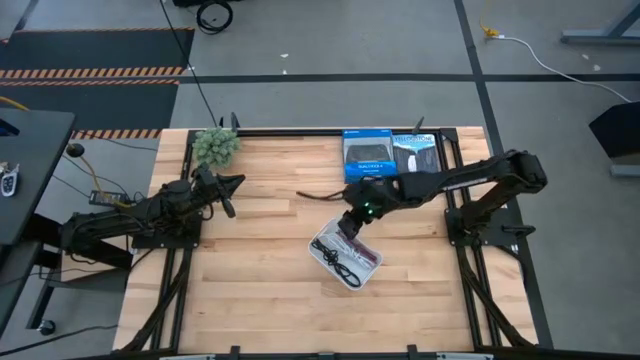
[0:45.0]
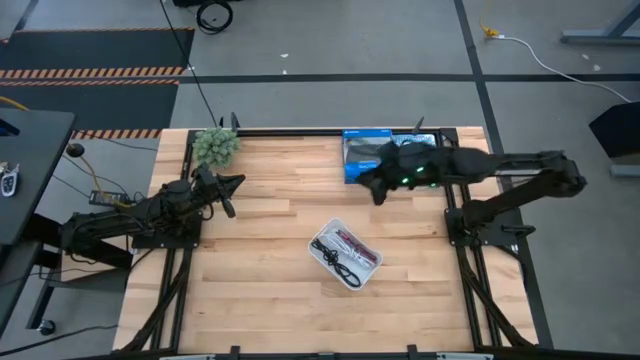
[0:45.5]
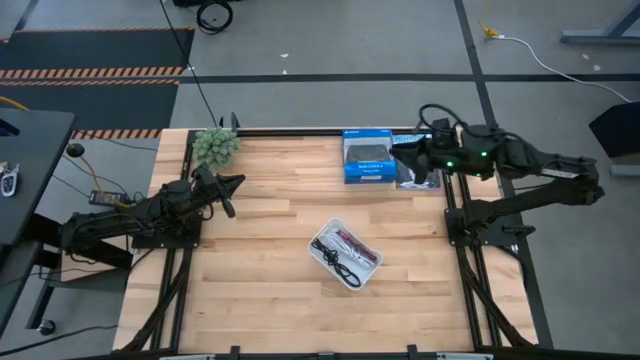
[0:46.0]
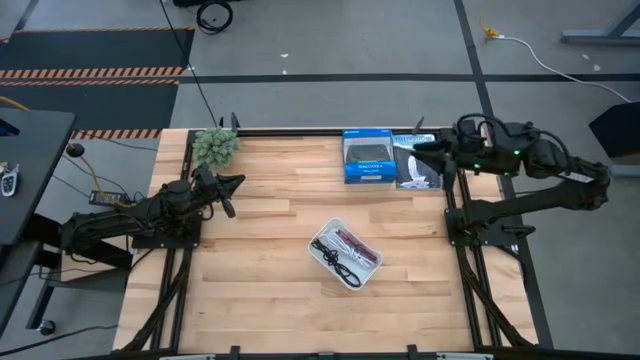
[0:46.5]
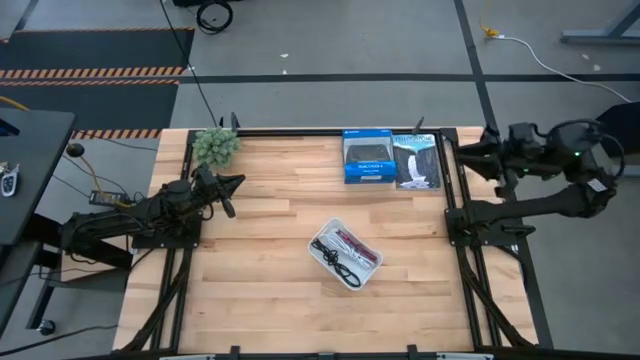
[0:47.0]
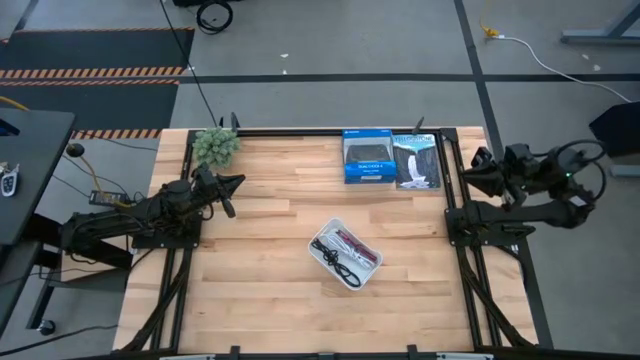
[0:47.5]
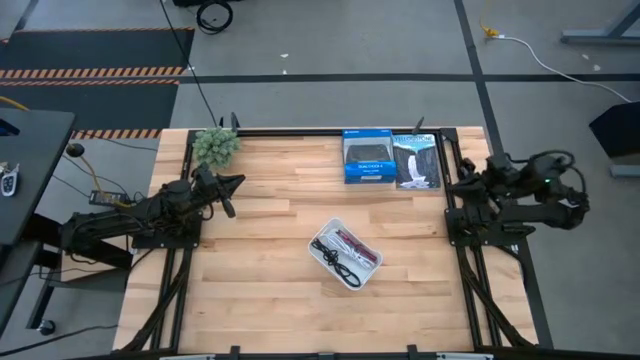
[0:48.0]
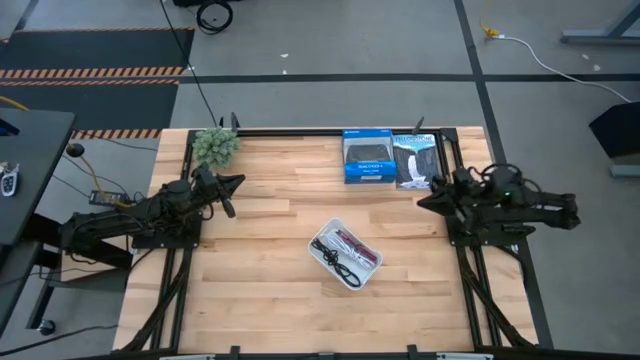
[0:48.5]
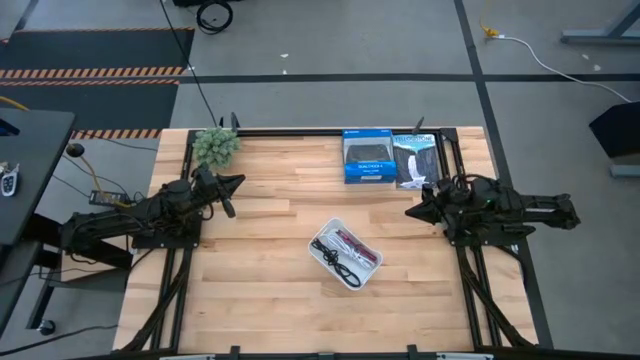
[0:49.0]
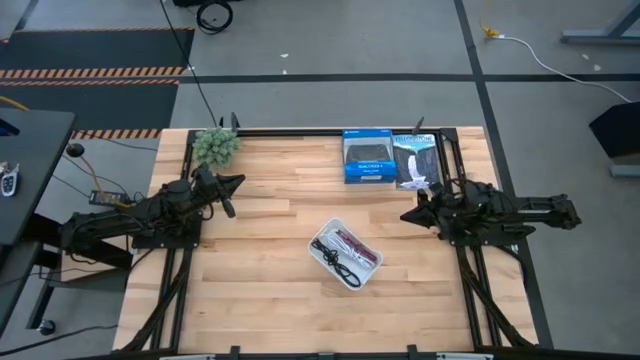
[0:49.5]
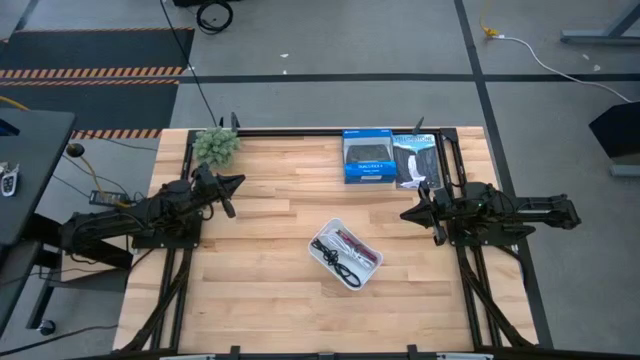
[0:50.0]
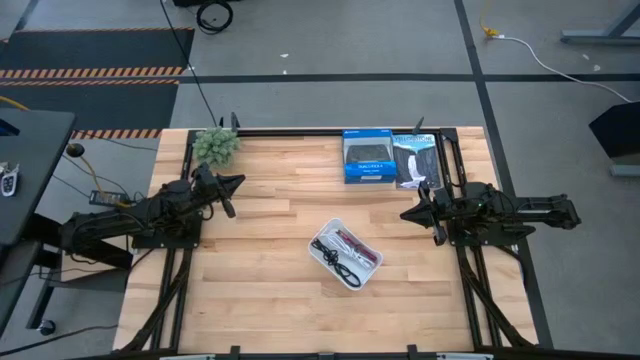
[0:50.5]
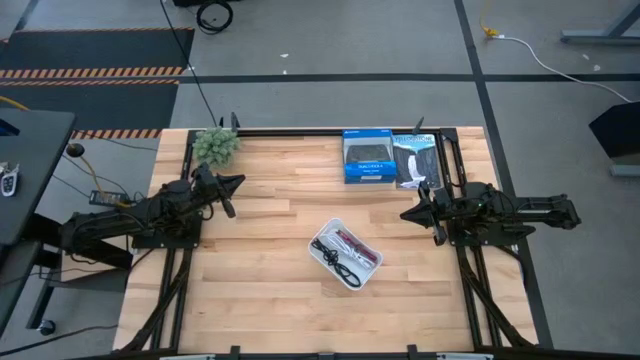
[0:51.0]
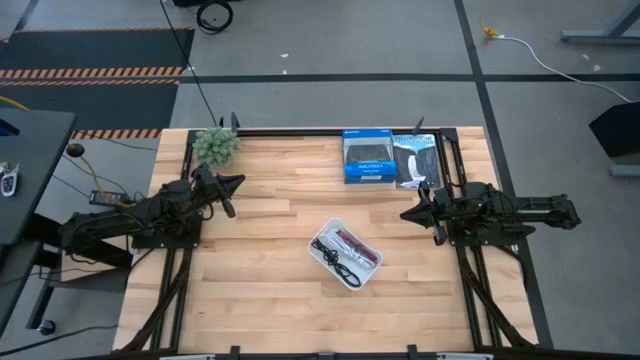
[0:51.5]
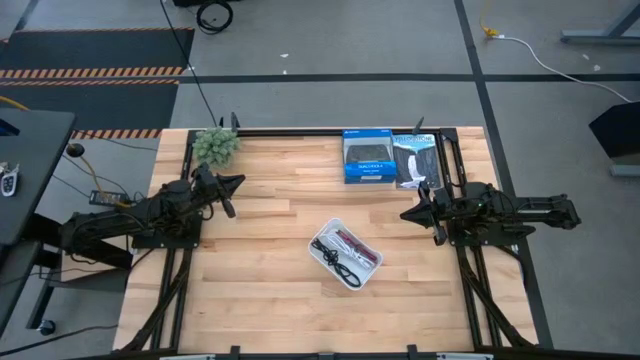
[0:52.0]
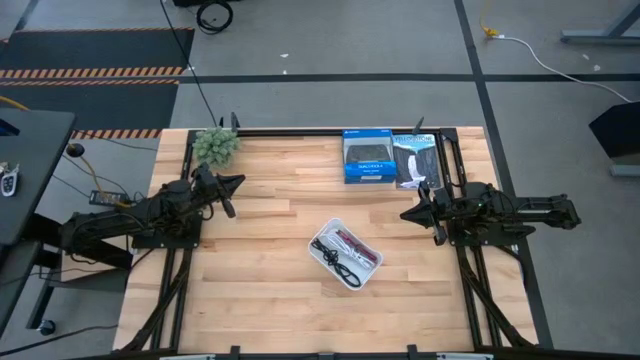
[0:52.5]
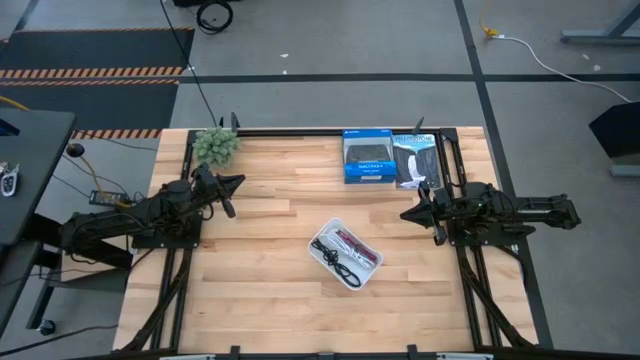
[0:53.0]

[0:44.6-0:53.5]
Task: Pick and place USB-C Cables
Return to Home Position

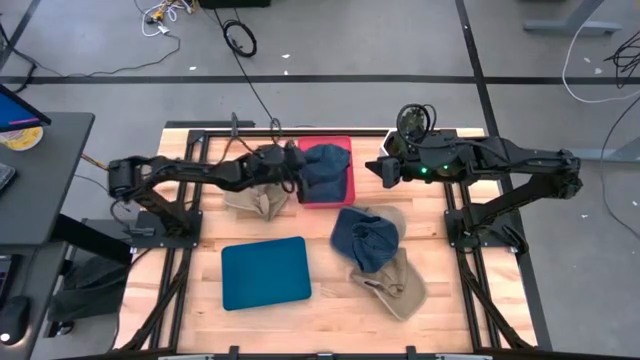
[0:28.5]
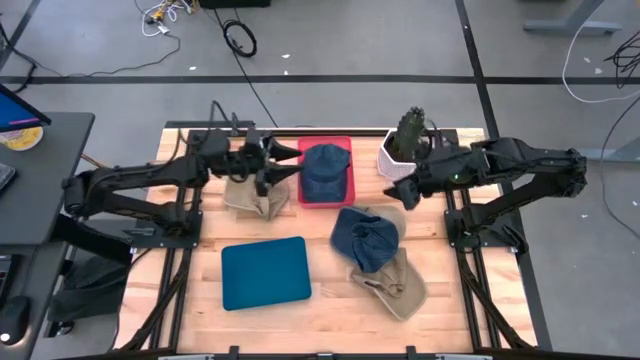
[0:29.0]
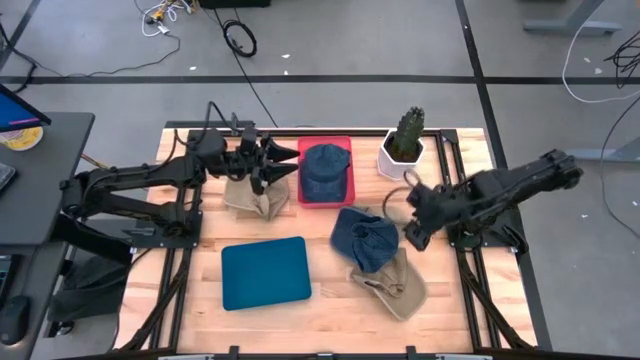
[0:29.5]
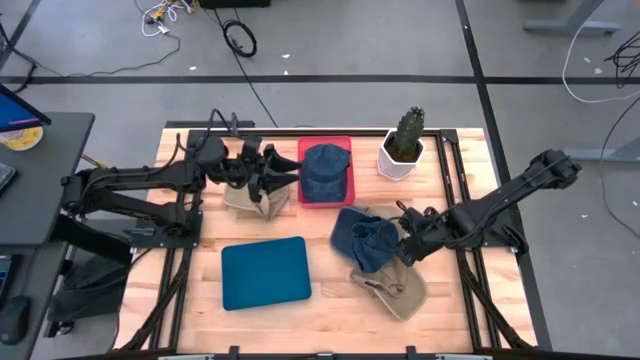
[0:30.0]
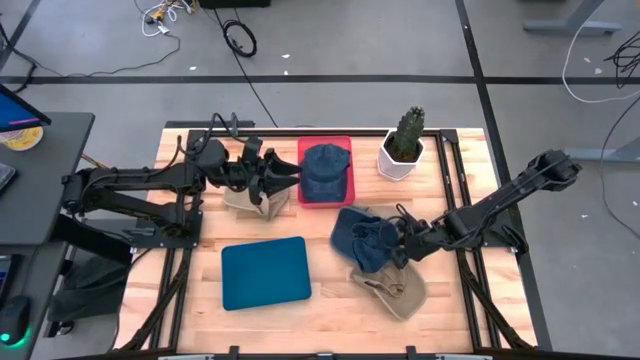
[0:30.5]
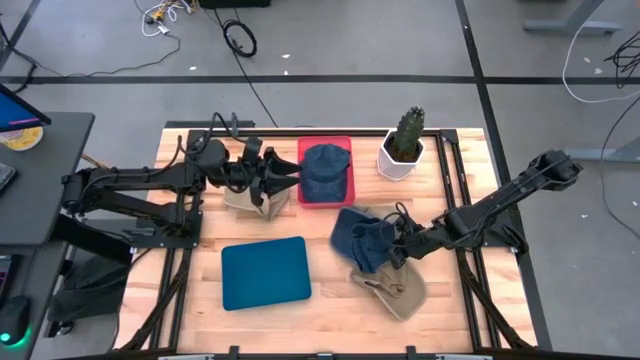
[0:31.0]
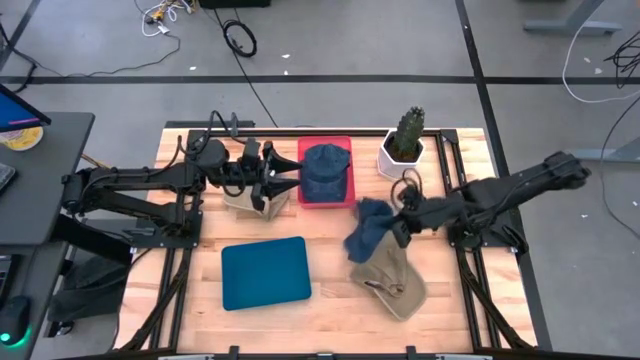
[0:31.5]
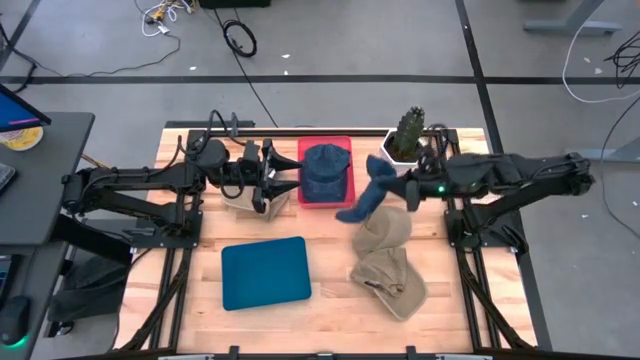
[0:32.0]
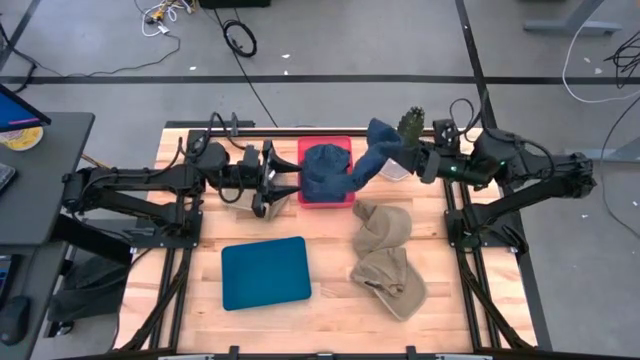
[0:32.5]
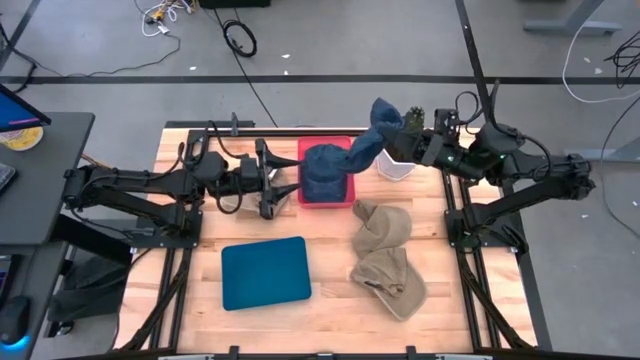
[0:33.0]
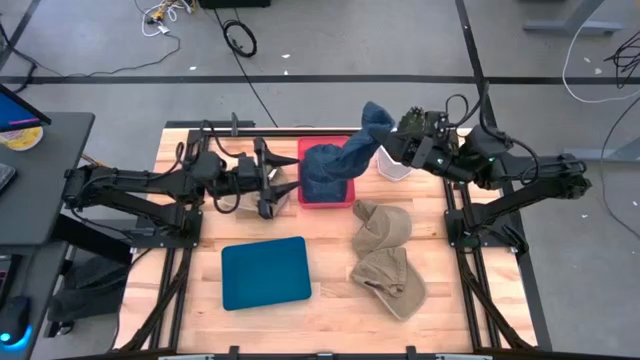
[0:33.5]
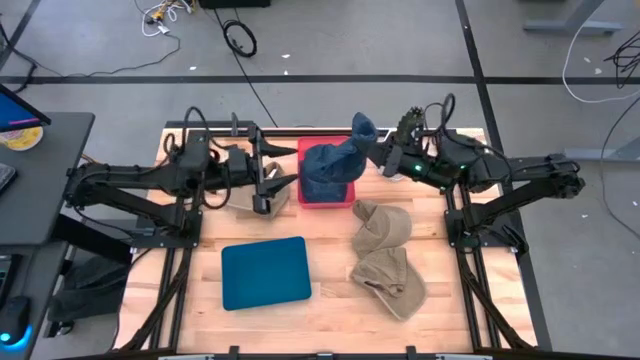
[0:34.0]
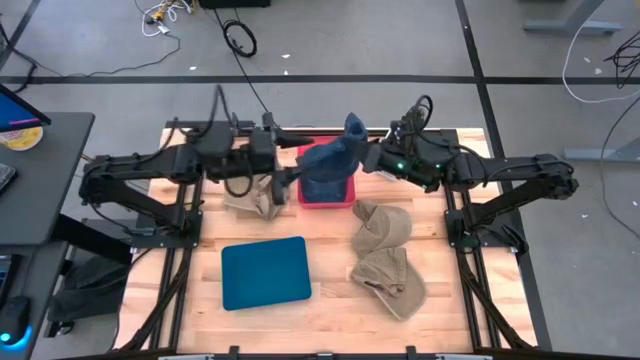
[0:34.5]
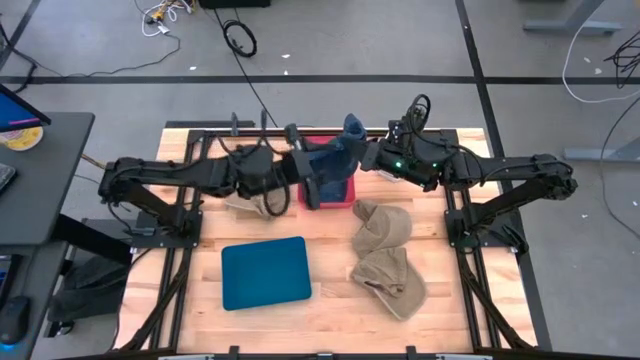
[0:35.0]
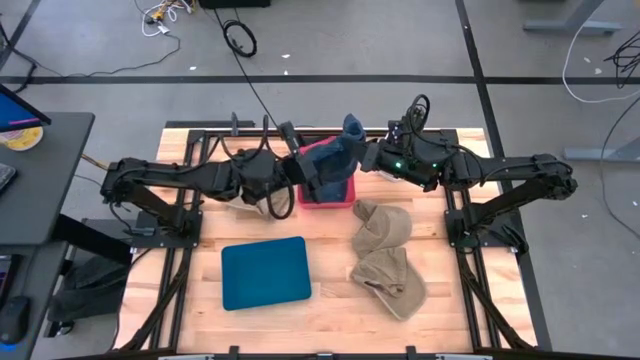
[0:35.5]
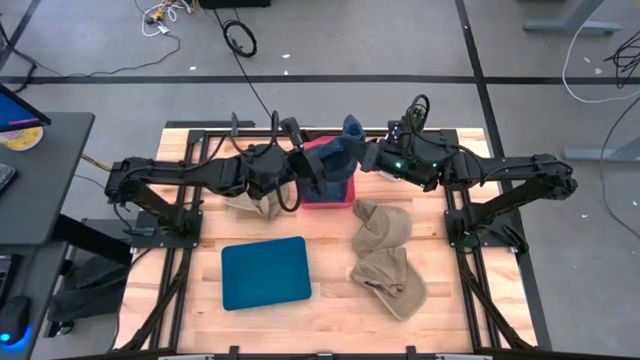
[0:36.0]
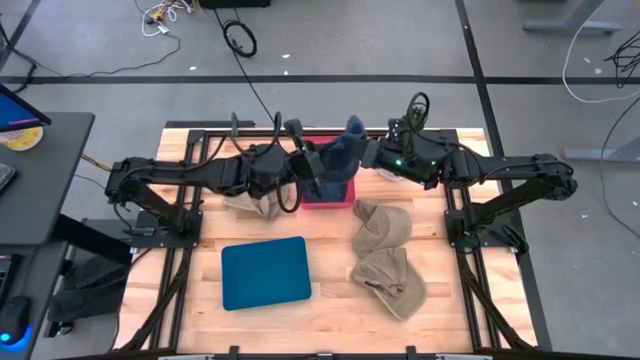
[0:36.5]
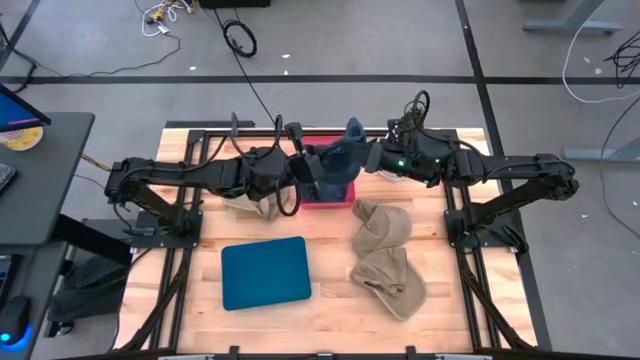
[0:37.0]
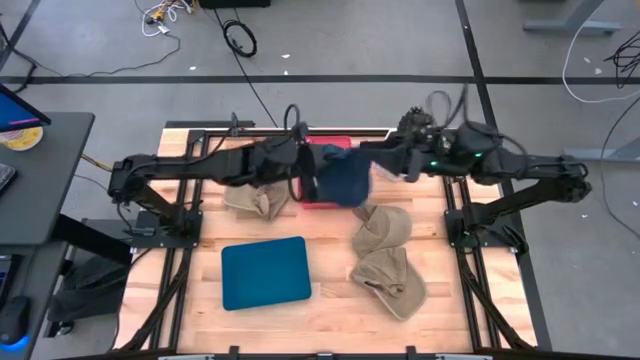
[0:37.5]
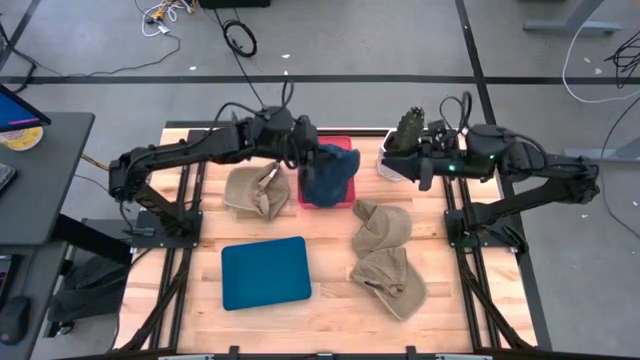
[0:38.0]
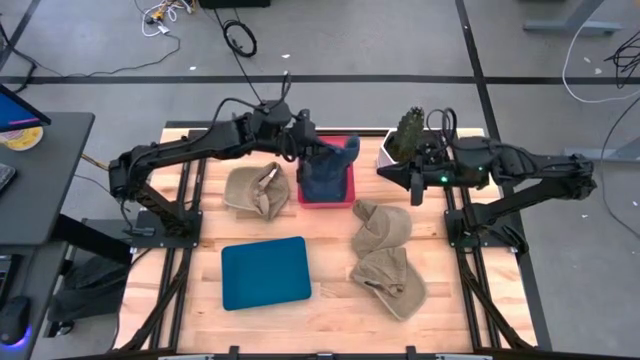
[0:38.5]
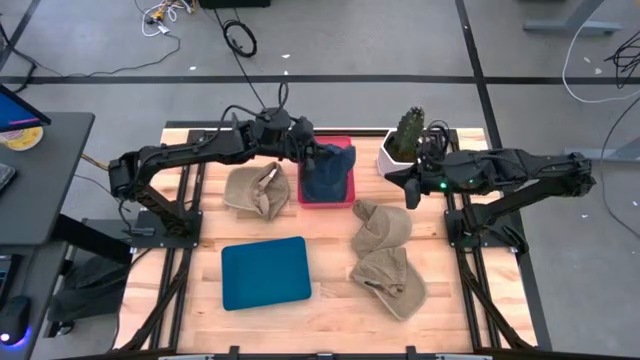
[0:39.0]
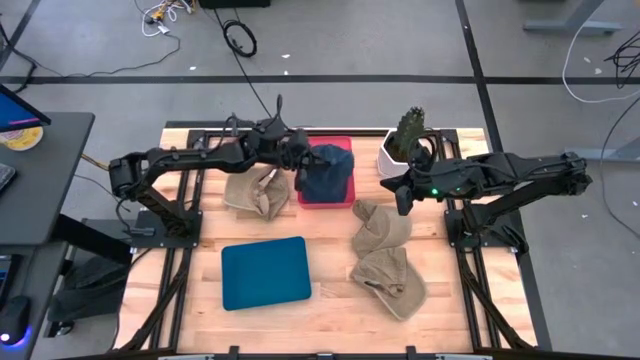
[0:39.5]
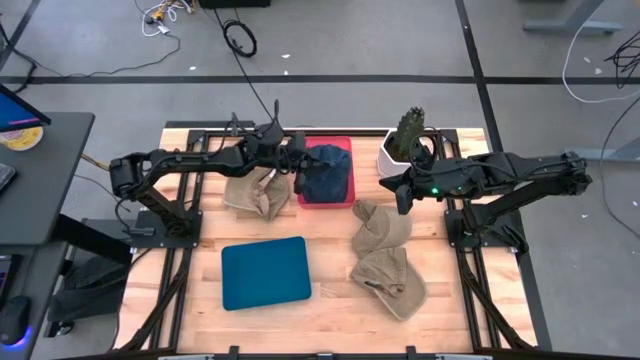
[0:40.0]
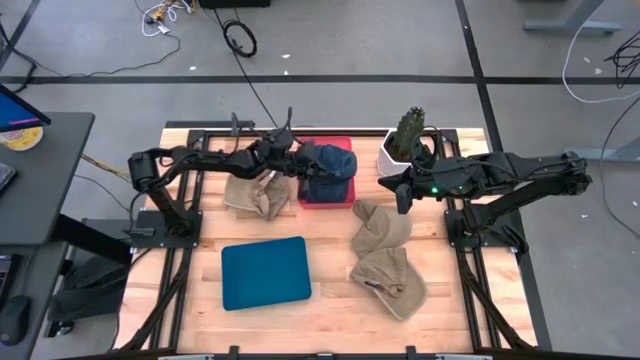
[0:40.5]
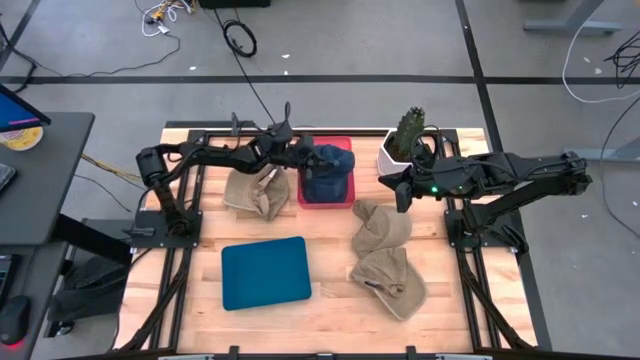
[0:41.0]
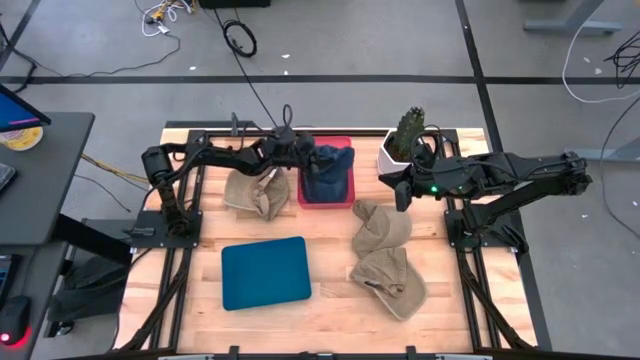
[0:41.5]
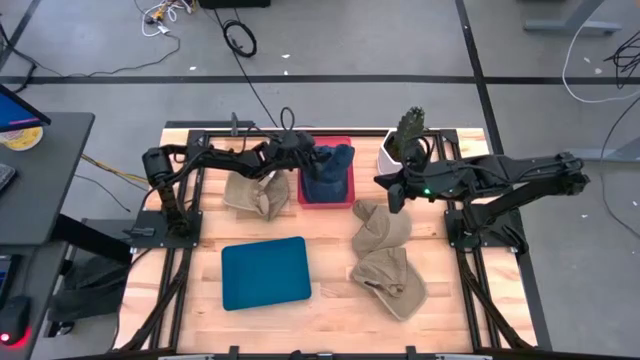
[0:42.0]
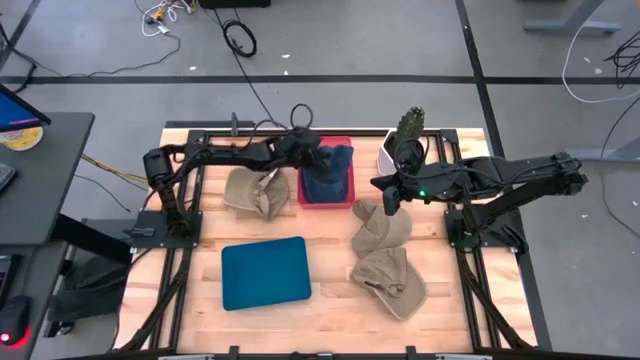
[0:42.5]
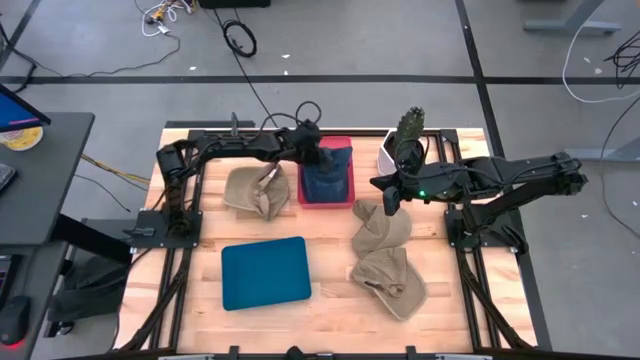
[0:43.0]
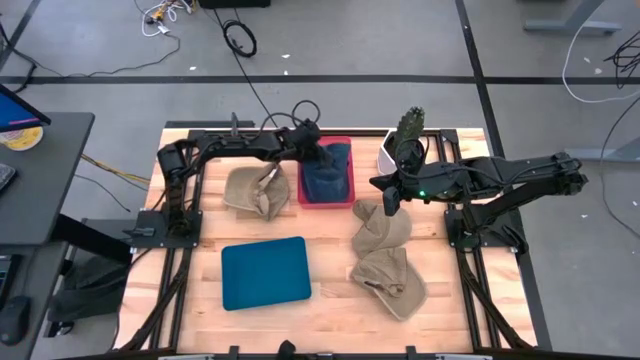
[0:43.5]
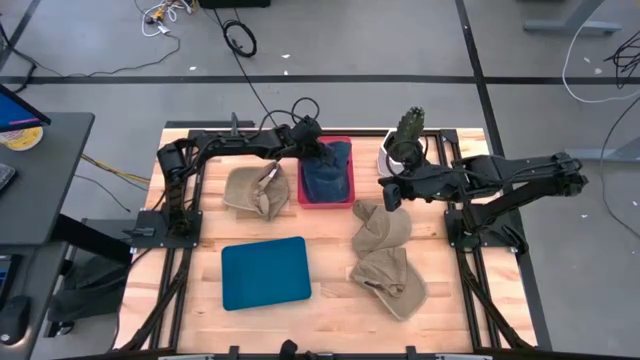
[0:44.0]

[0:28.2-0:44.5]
Task: Pick & Place hat
Put the blue cap into the pink bin
